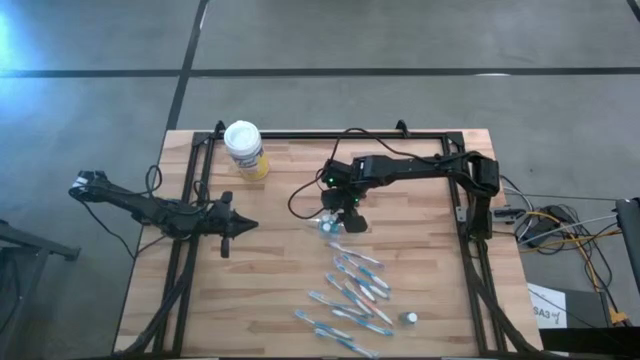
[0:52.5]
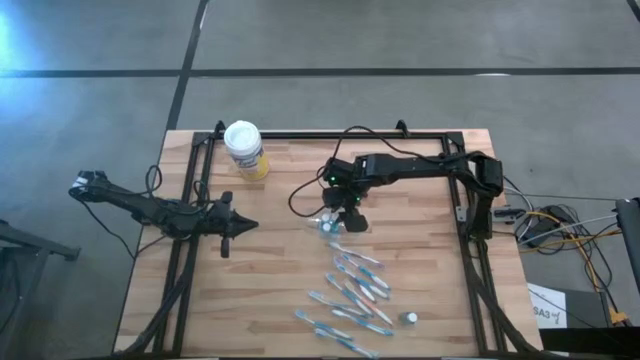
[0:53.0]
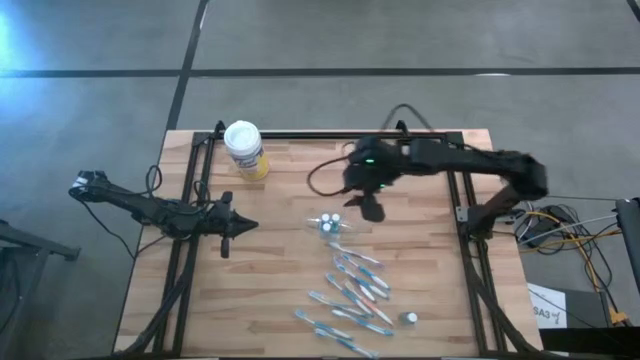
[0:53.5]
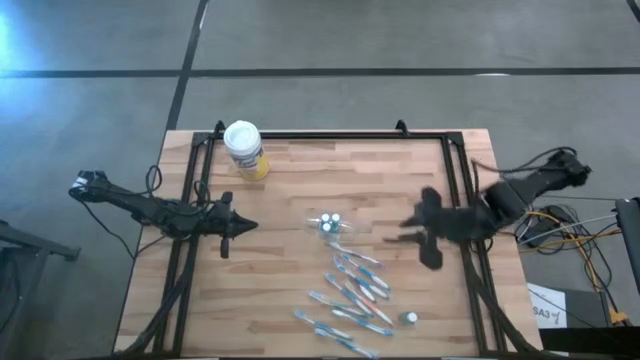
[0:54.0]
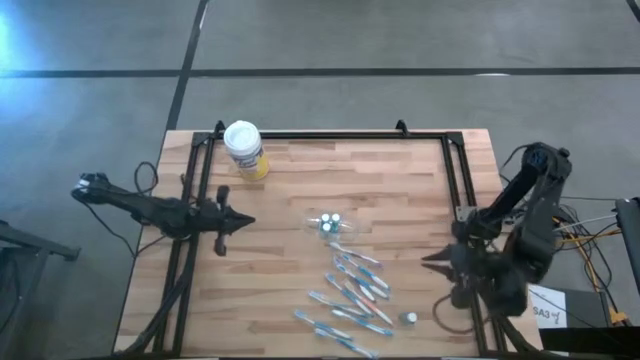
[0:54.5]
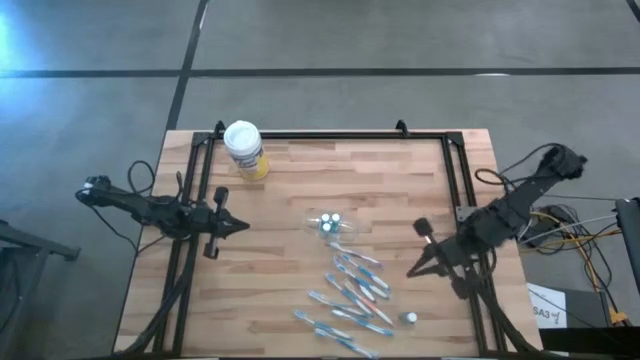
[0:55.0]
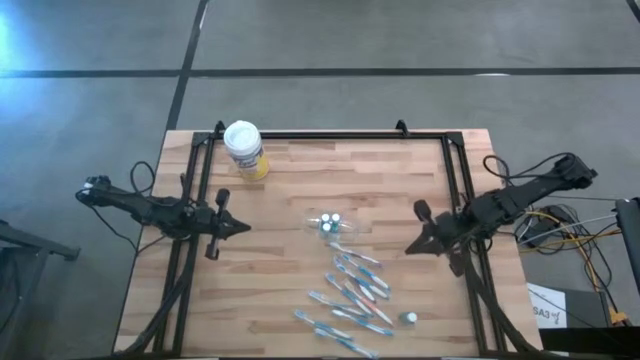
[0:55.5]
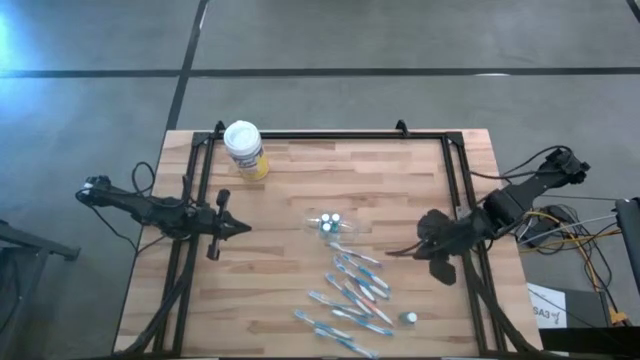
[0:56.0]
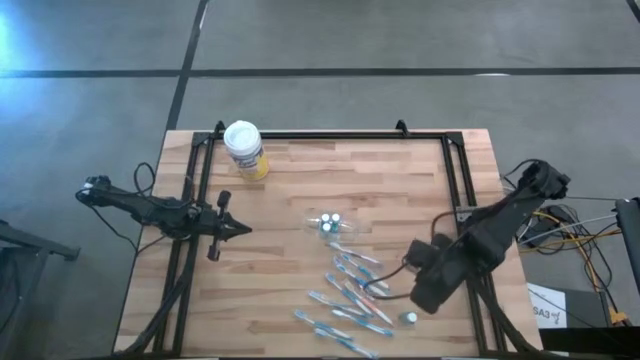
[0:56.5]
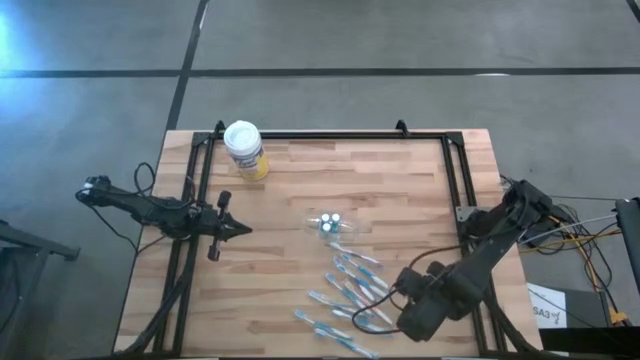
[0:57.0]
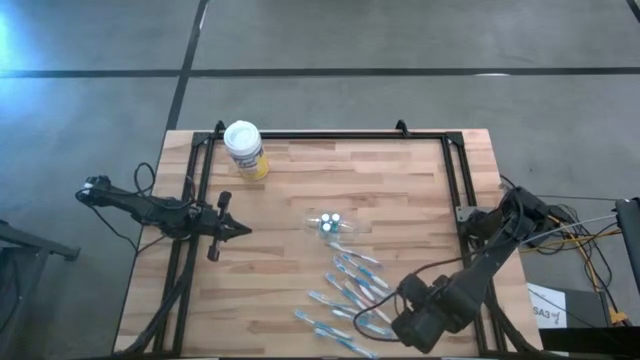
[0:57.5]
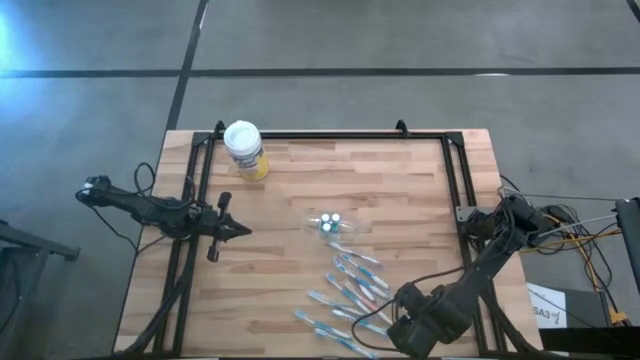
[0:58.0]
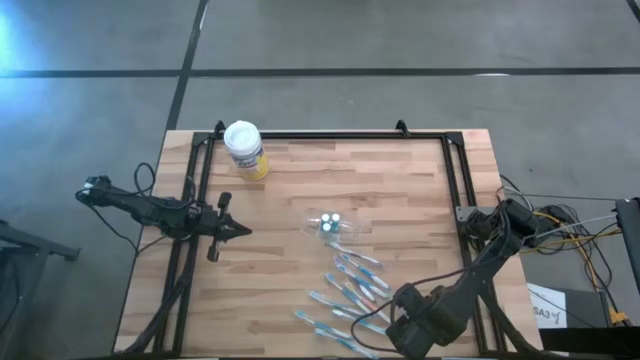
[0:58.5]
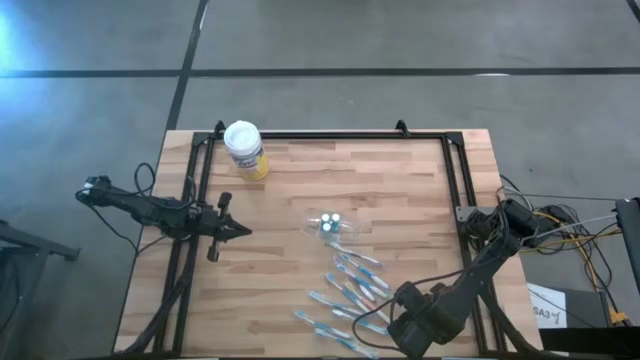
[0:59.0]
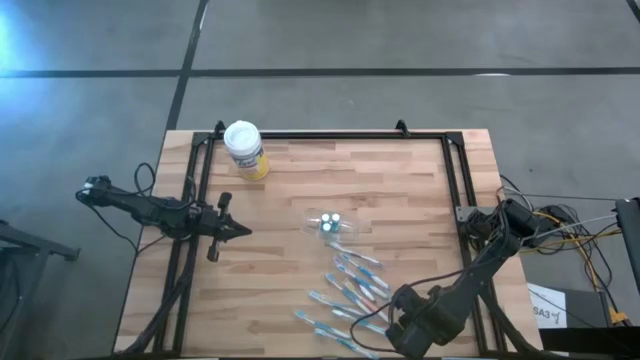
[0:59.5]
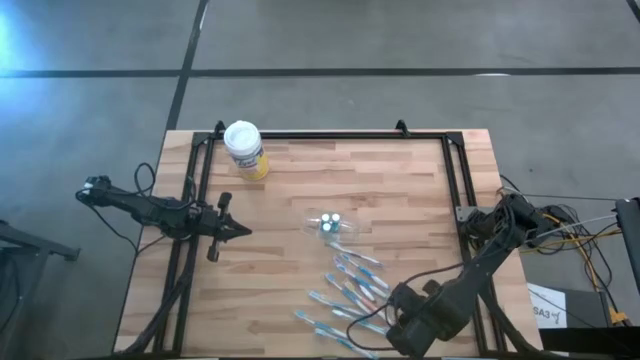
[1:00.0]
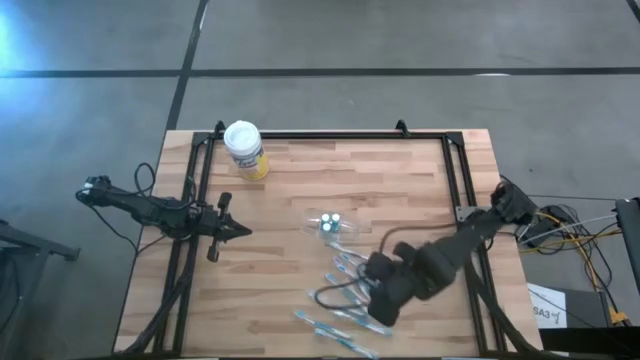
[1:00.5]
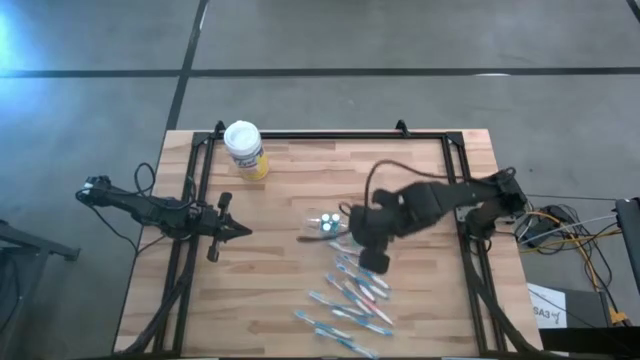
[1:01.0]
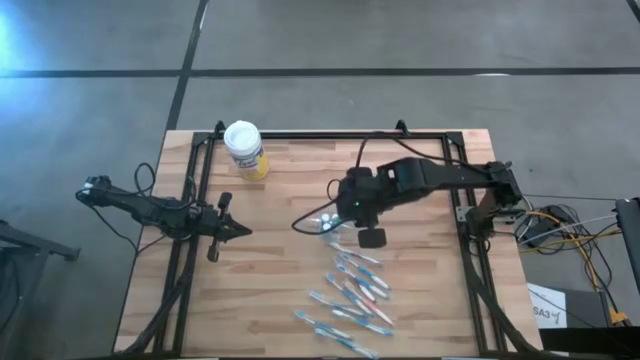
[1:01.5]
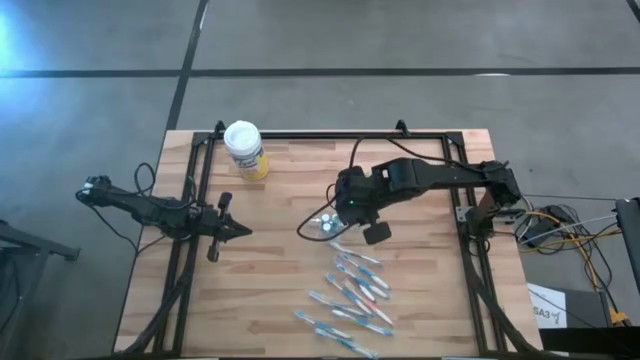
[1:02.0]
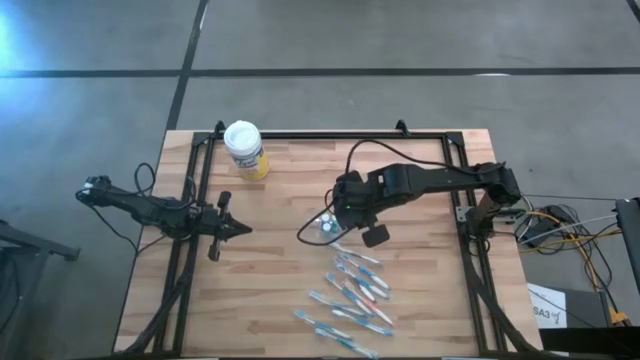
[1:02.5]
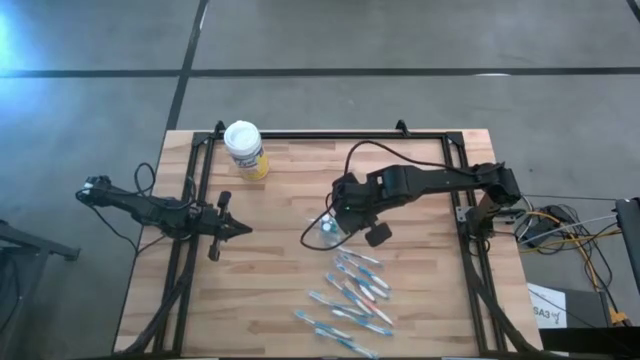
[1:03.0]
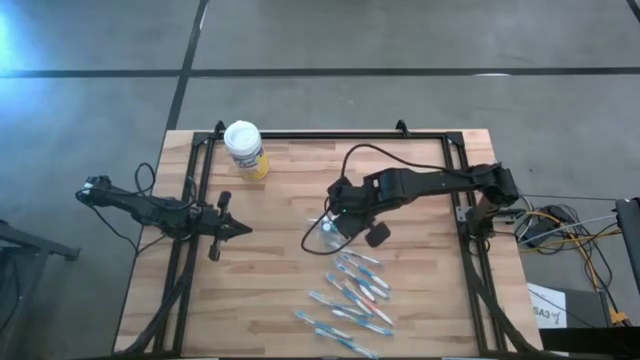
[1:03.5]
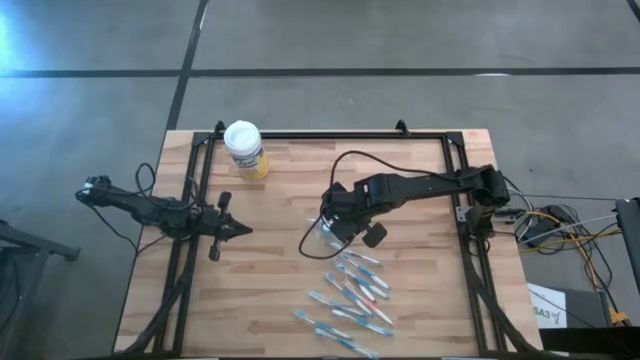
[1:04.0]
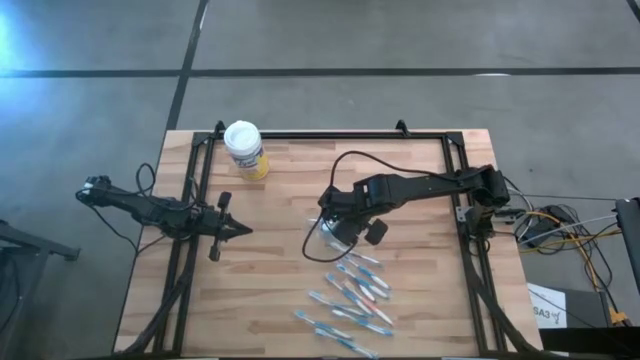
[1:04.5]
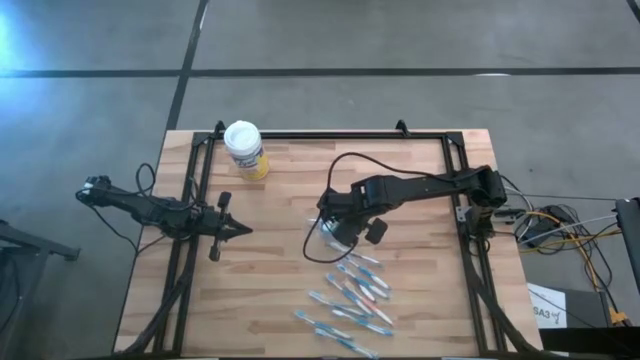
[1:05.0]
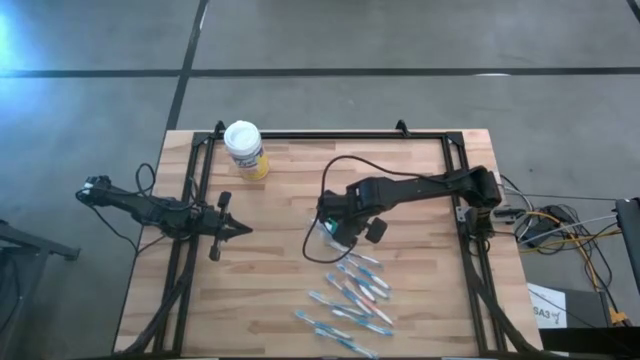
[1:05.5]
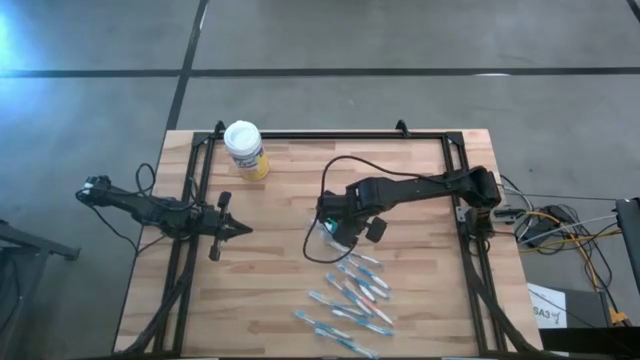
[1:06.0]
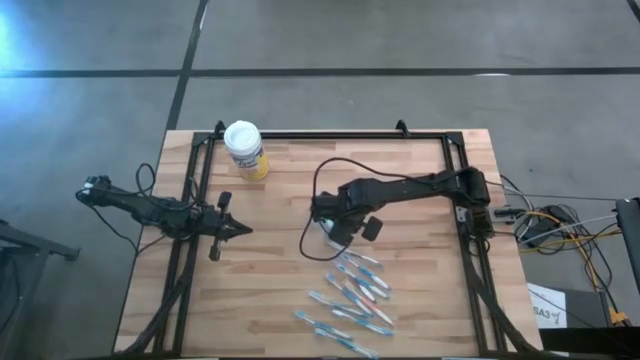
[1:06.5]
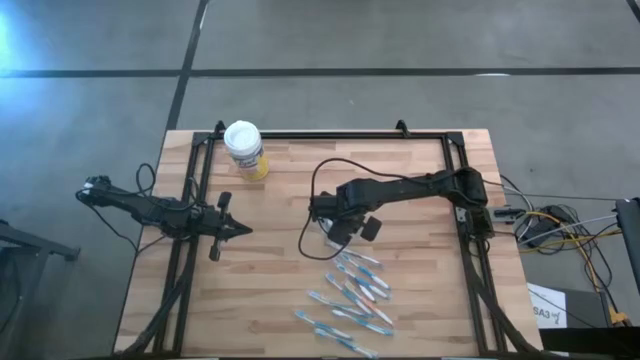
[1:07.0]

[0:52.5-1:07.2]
Task: Pick & Place toothbrushing station
Put the blue mouthwash bottle into the middle compartment of the transparent organizer

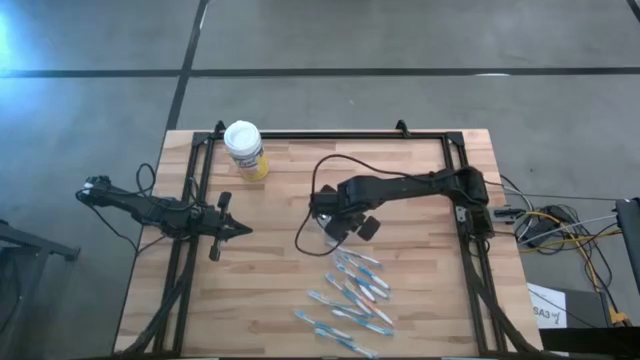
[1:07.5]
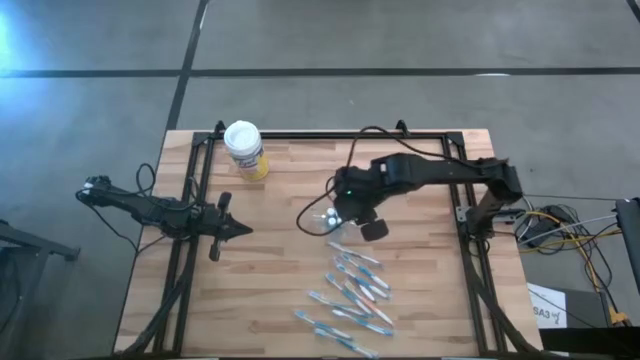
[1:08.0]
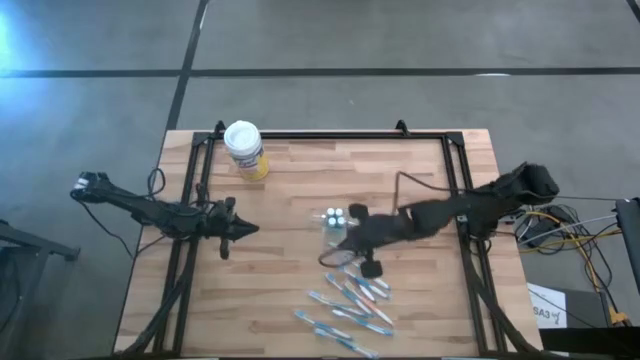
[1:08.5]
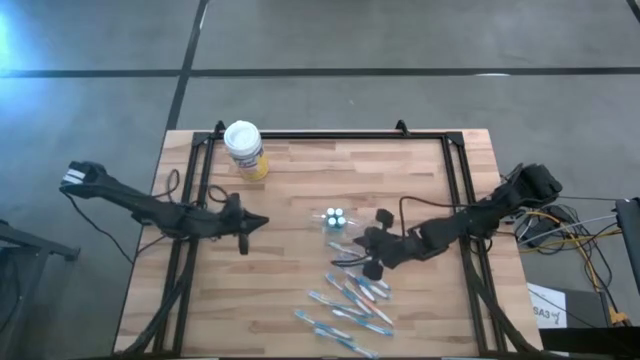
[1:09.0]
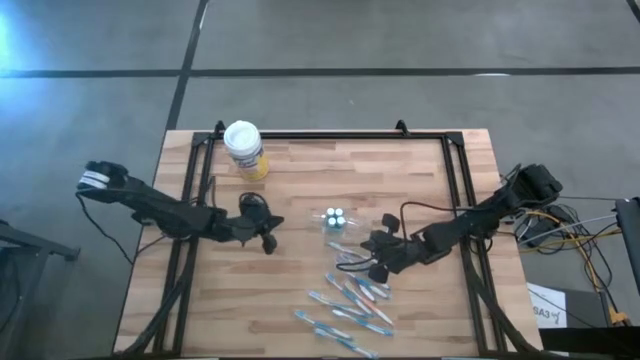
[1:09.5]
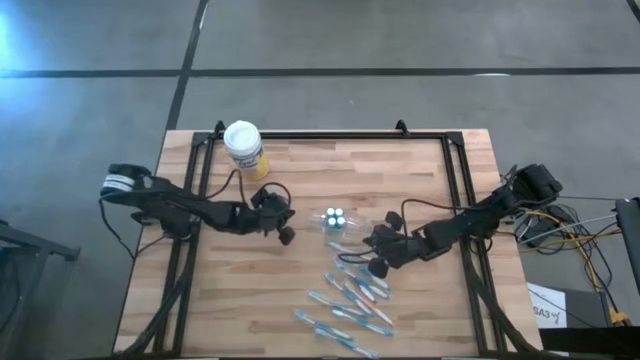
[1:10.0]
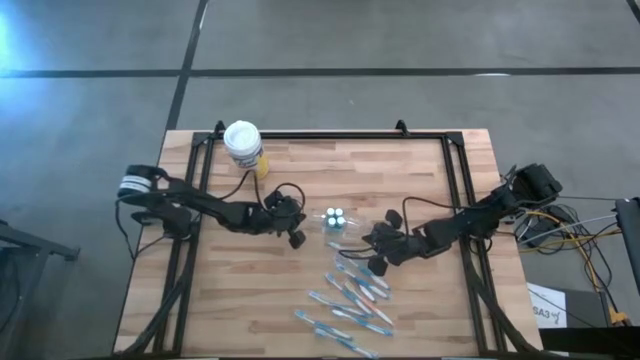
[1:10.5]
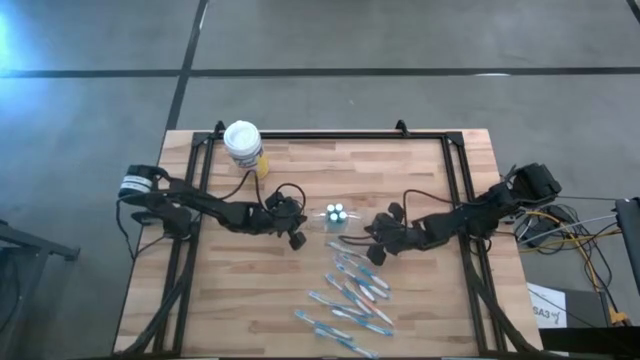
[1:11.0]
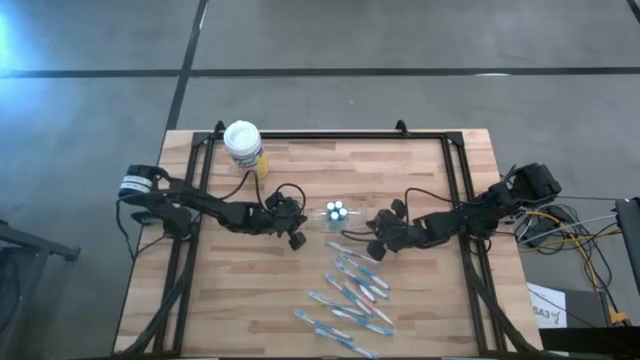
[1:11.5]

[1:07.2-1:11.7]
Adjust the transparent organizer on the table

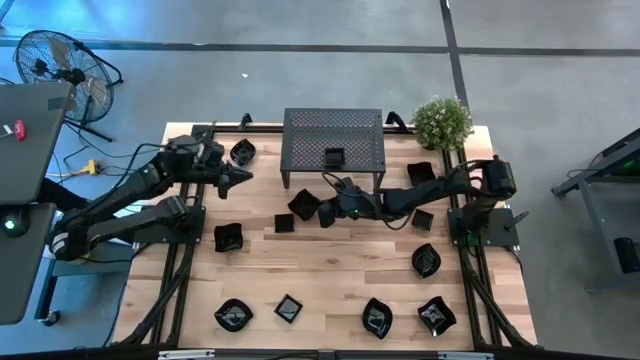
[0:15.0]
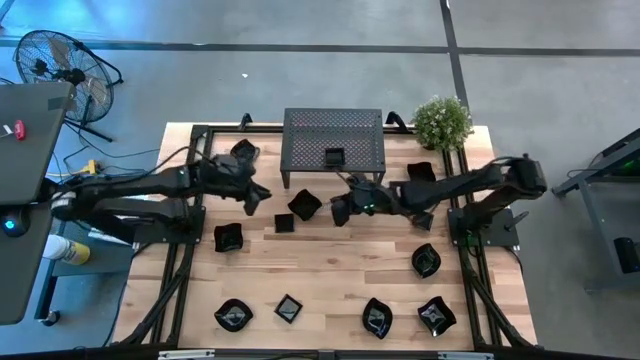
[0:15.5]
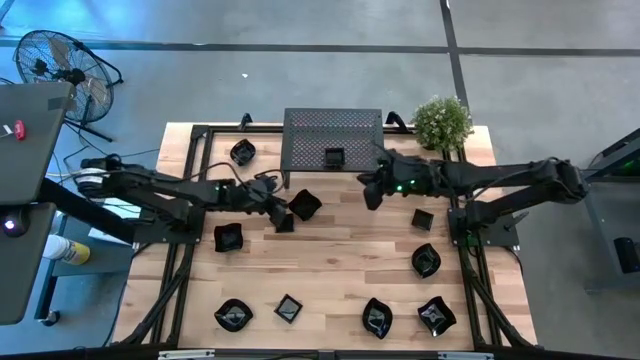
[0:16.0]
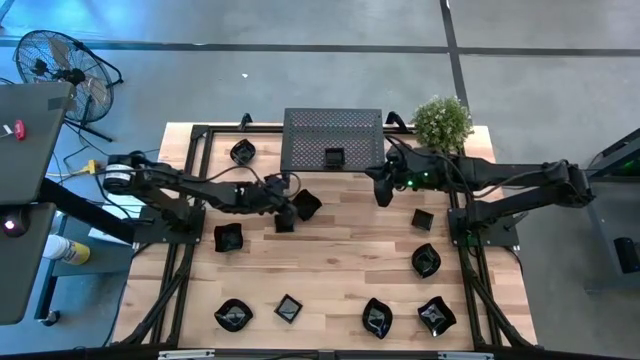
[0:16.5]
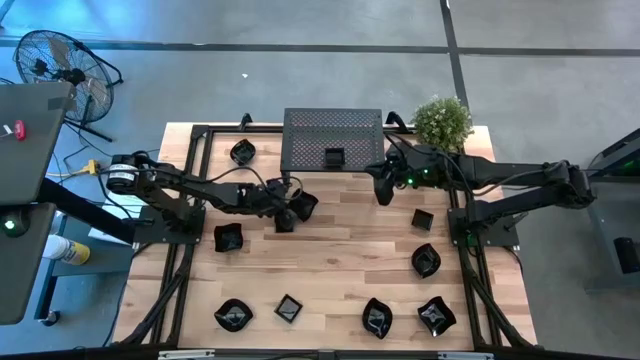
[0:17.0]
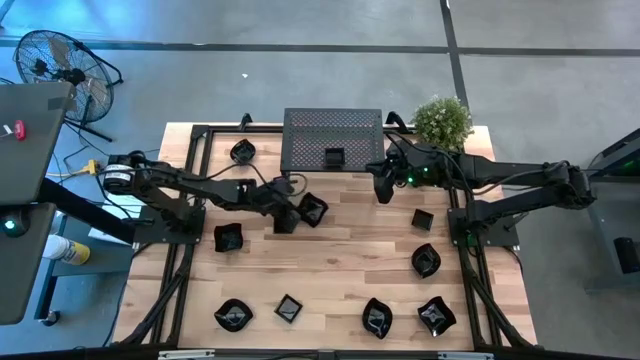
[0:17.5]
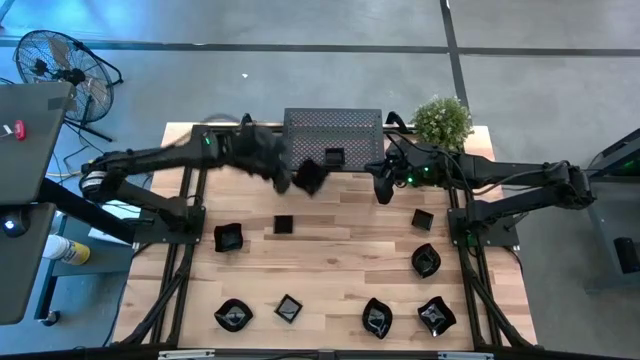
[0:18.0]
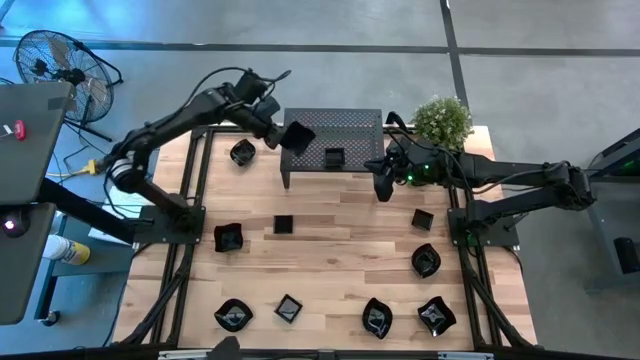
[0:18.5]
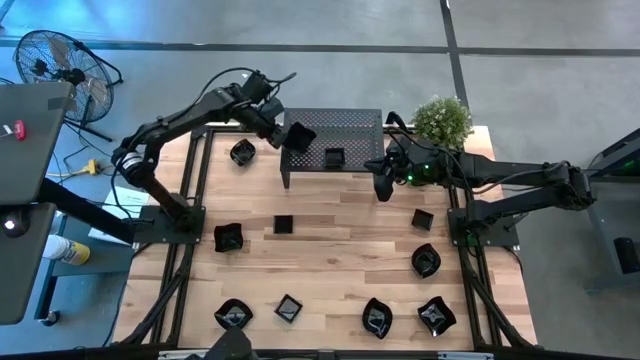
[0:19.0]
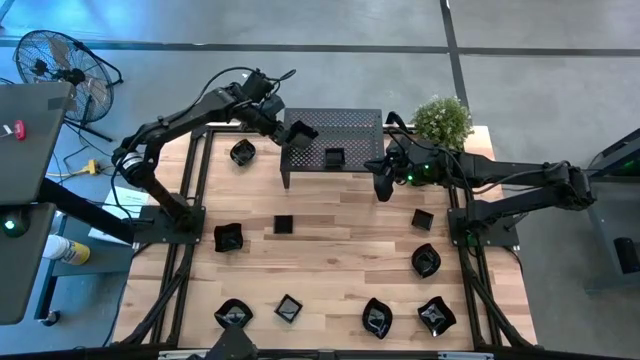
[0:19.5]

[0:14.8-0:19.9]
Task: Pick & Place Mini shaped plates
Put the black distorted square plate on the shelf
